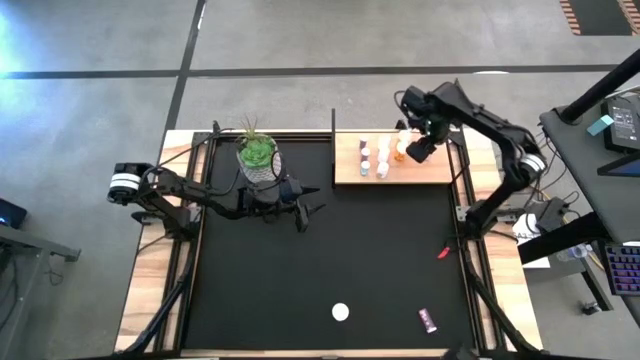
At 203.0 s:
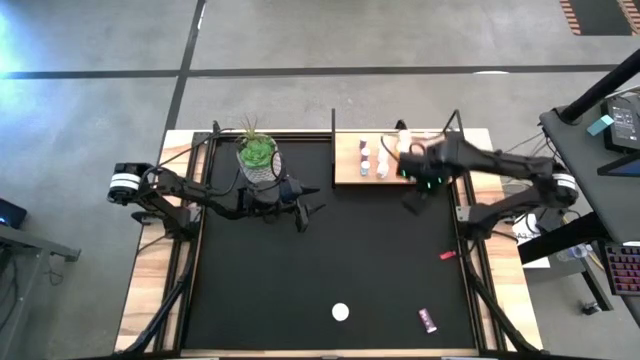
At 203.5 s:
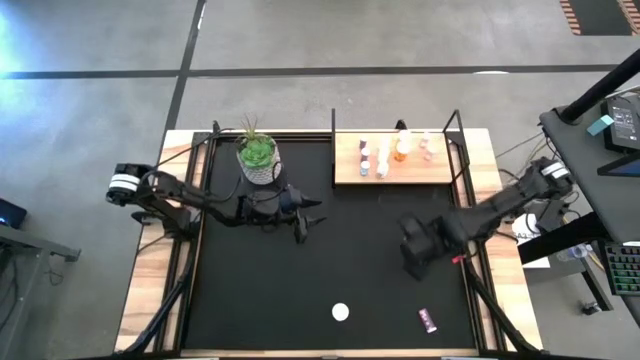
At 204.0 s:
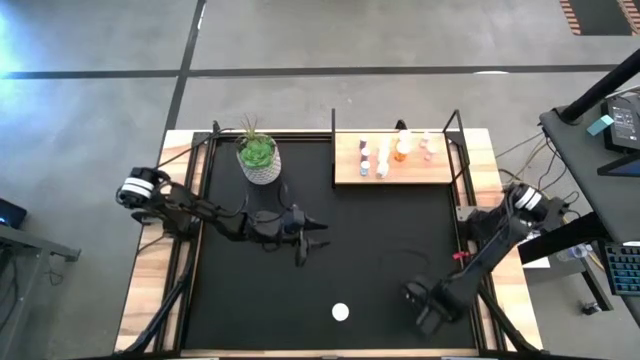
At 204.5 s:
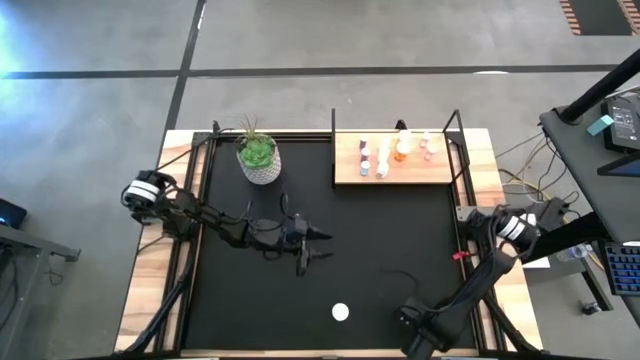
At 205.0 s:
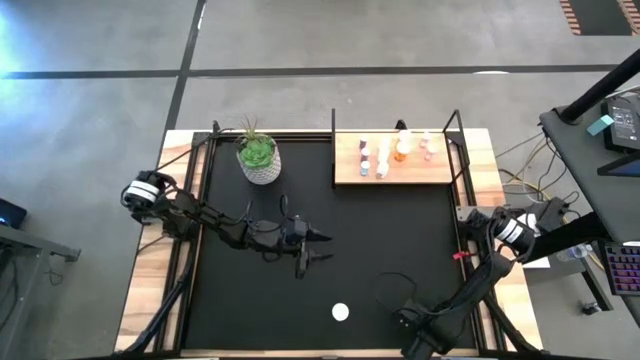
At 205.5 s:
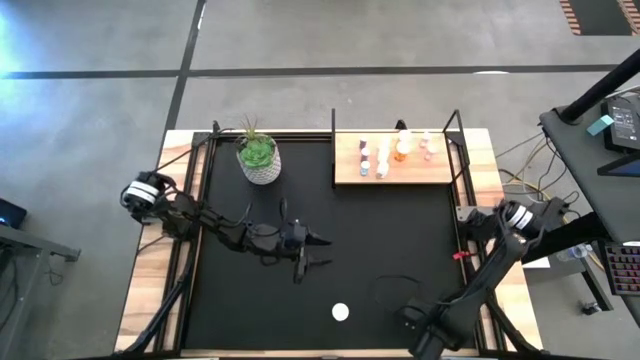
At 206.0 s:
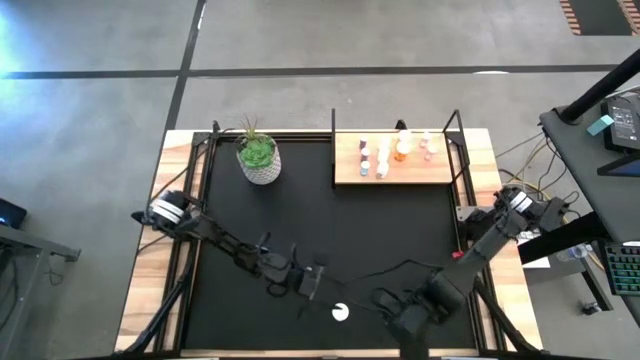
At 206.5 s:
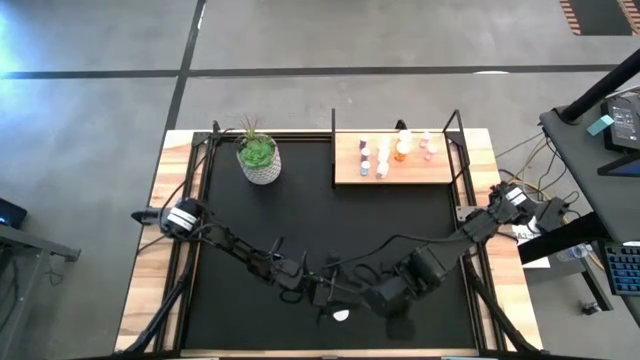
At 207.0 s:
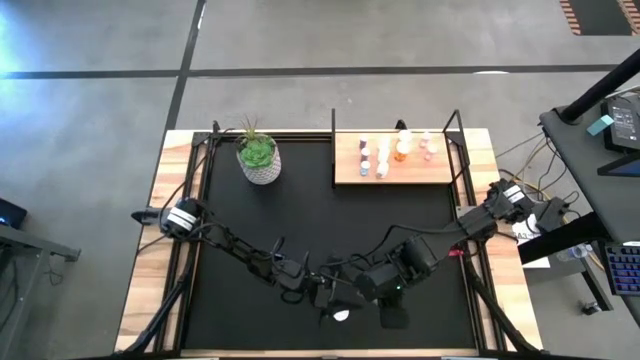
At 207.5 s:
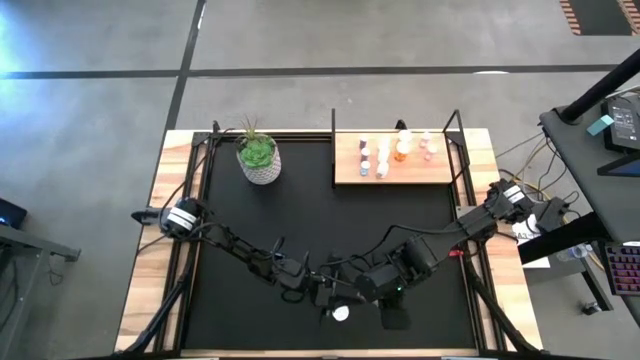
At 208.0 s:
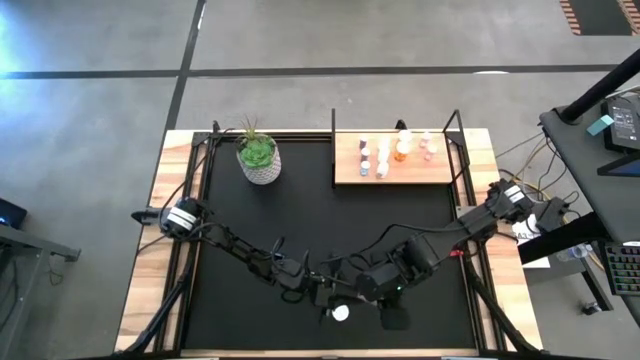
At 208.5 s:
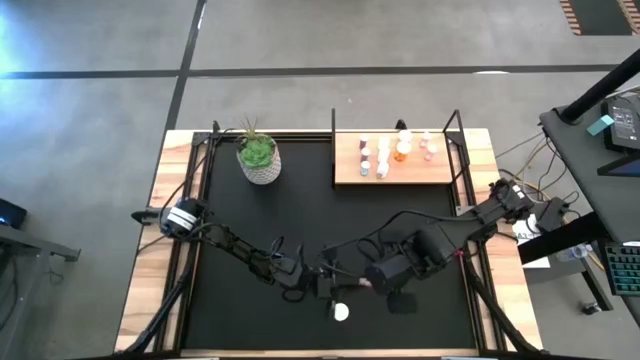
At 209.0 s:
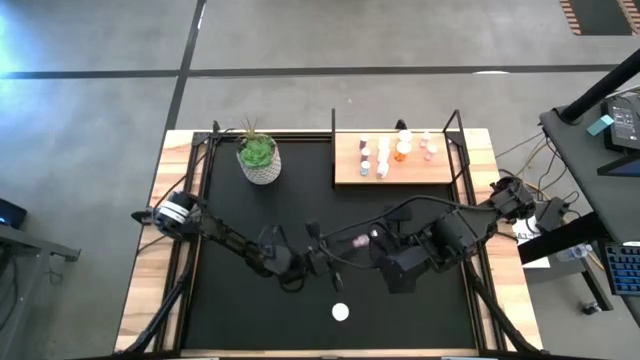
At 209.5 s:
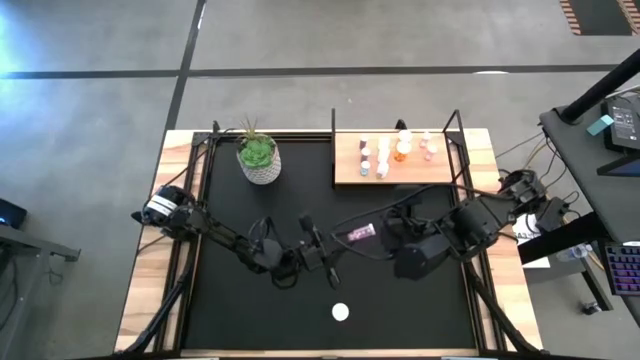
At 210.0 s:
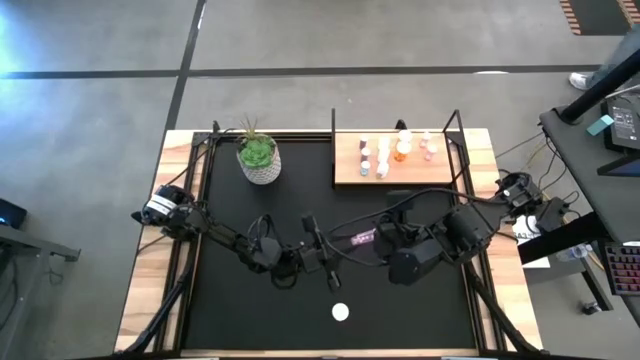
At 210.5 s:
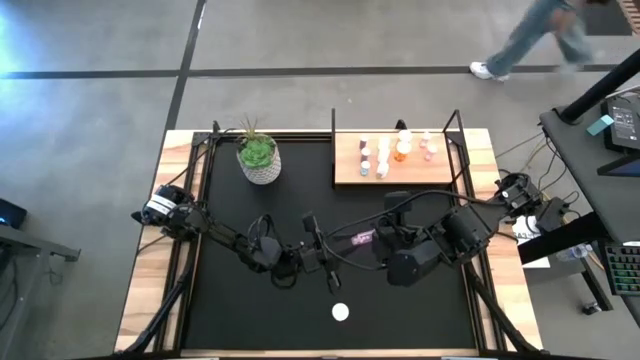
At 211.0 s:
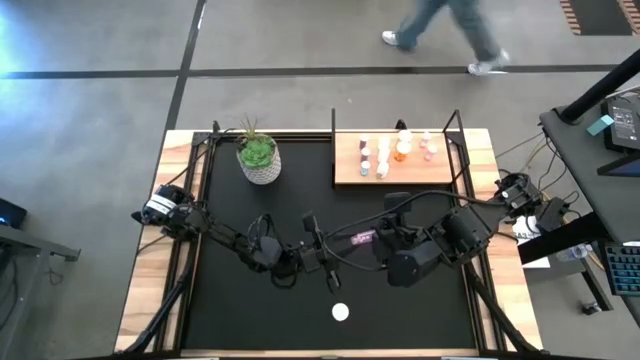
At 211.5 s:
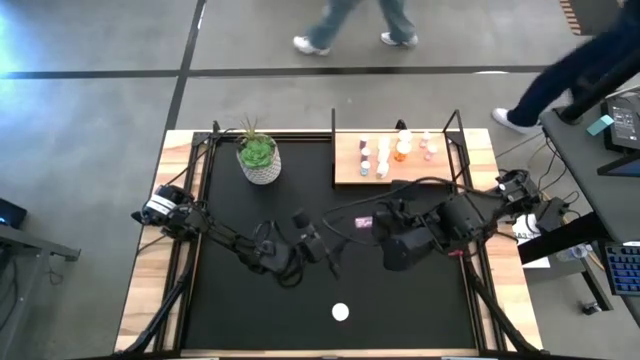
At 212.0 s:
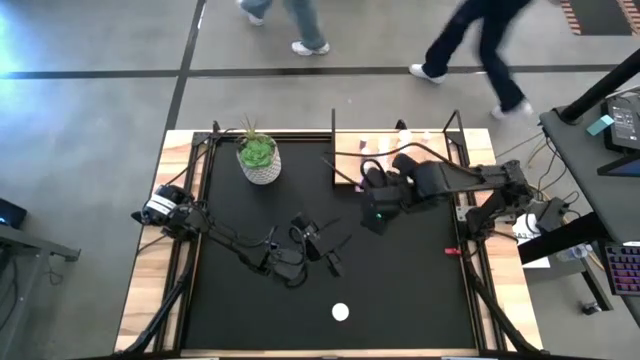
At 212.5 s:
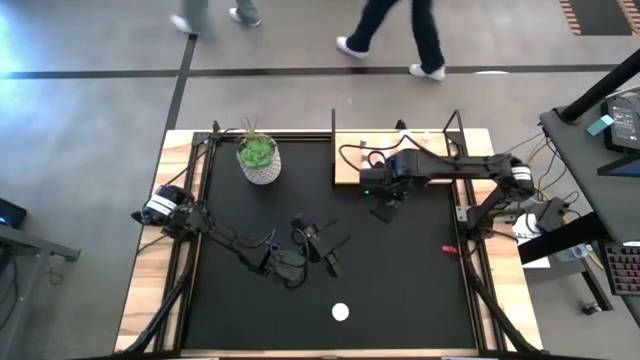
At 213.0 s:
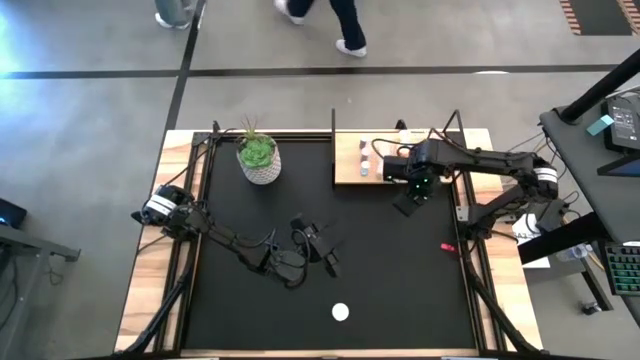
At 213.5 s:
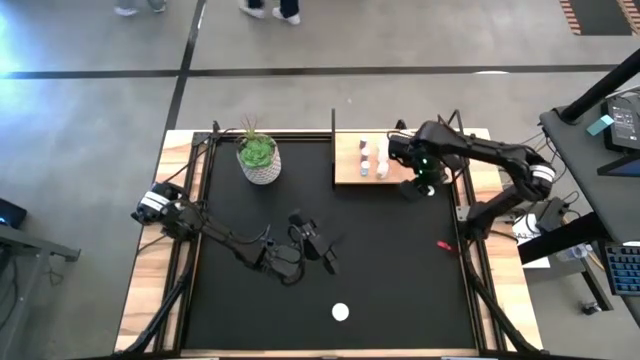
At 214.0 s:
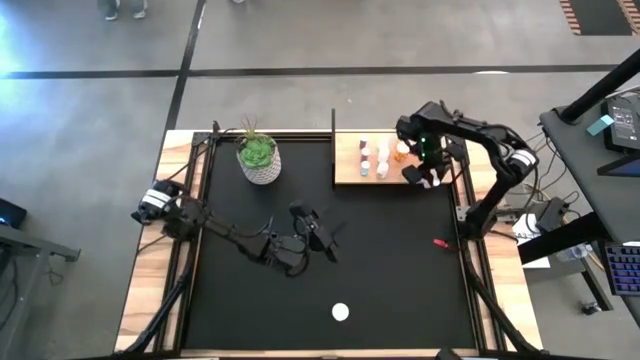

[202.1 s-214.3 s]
Task: Pick and place medicine bottles onto shelf by color
Put the pink pill bottle on the shelf aligned with the other pink pill bottles

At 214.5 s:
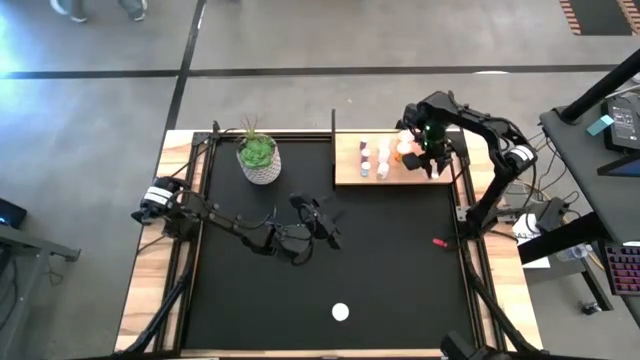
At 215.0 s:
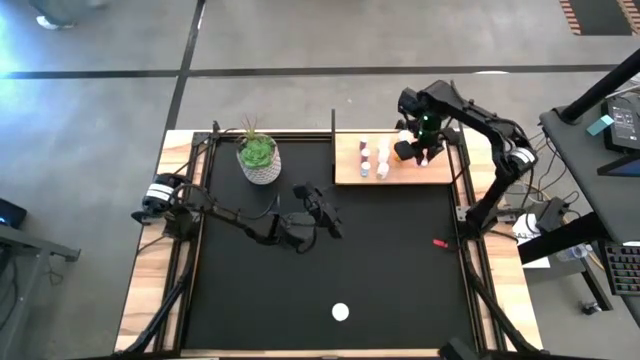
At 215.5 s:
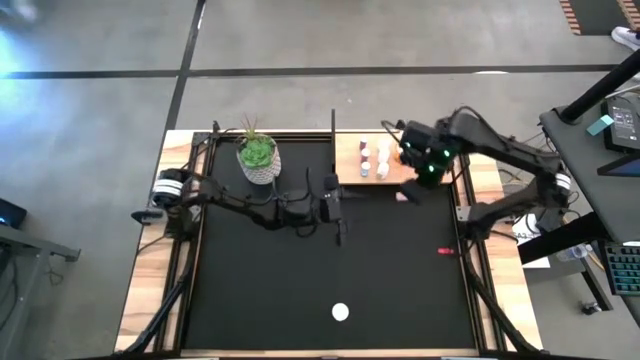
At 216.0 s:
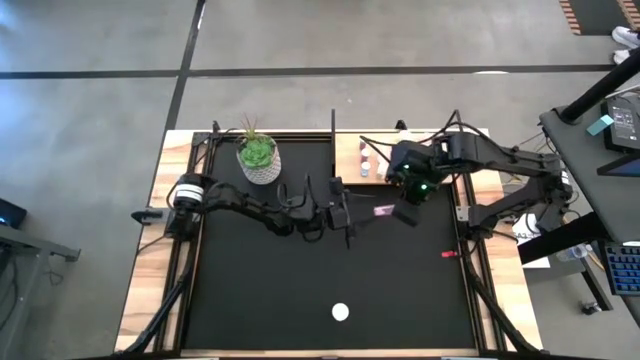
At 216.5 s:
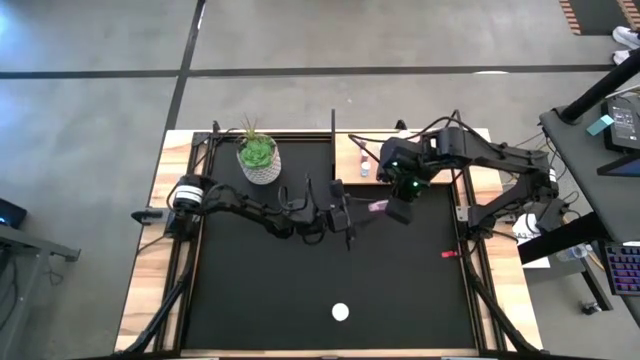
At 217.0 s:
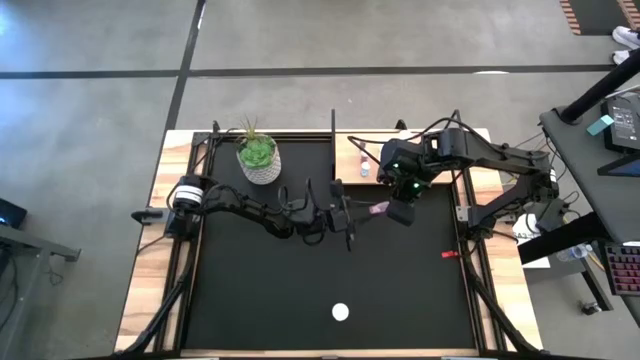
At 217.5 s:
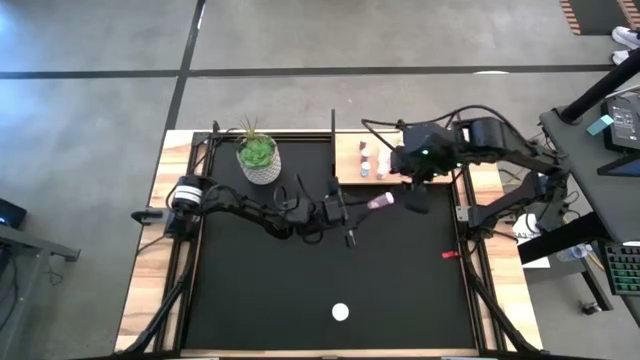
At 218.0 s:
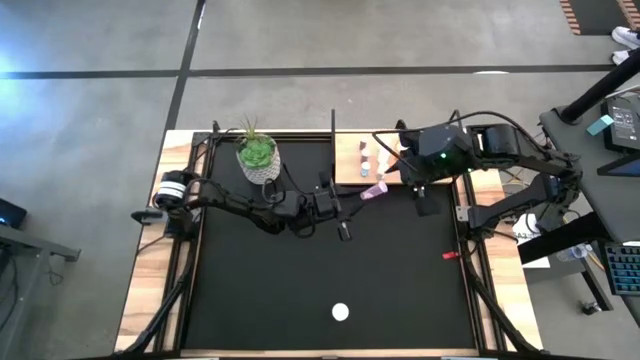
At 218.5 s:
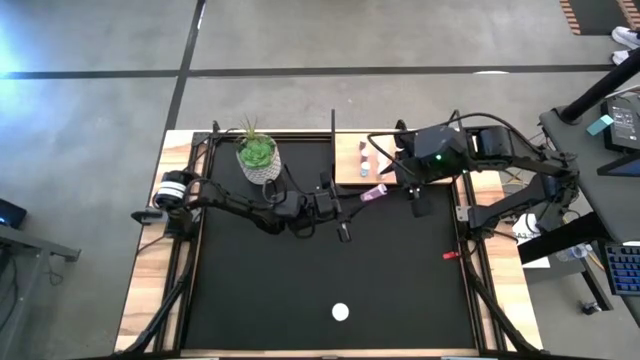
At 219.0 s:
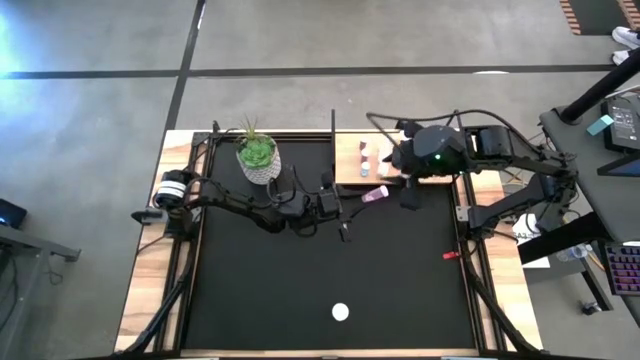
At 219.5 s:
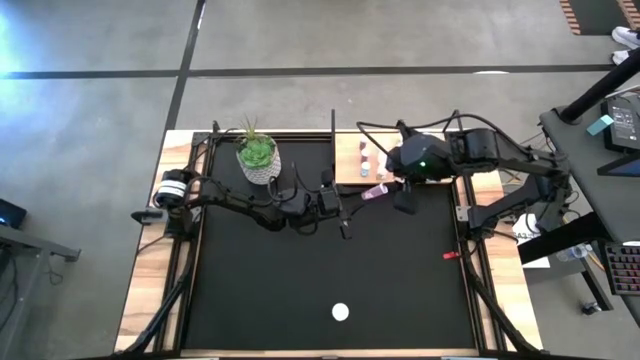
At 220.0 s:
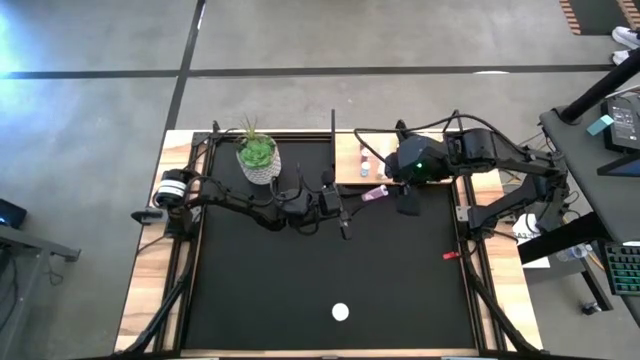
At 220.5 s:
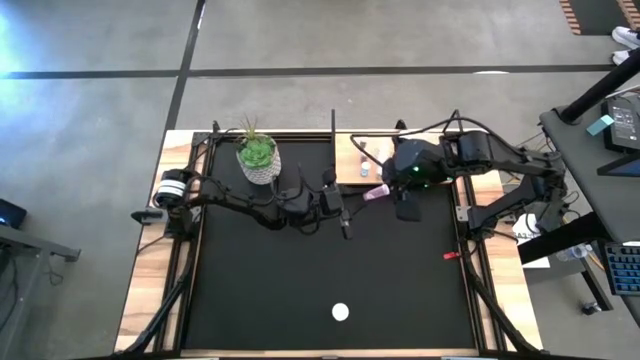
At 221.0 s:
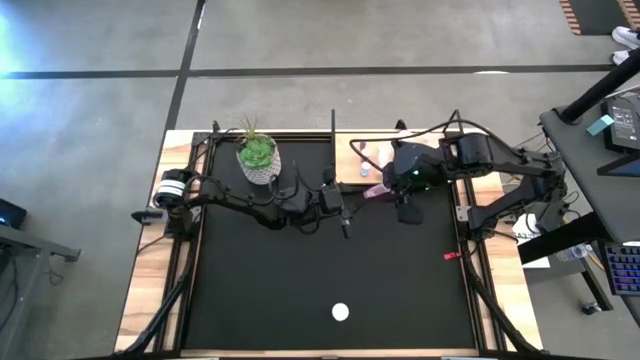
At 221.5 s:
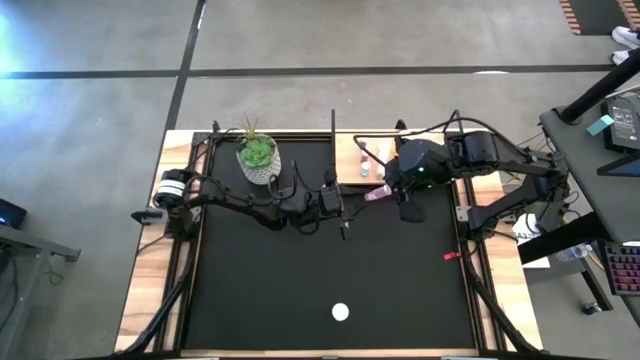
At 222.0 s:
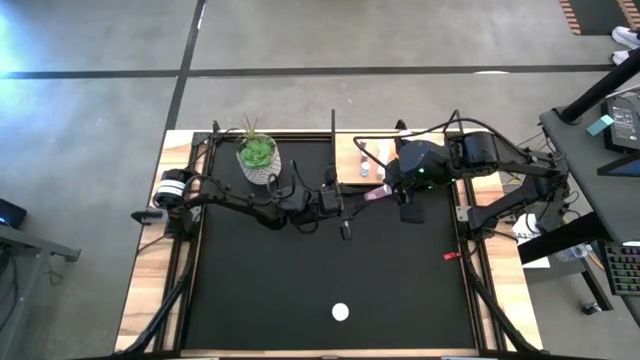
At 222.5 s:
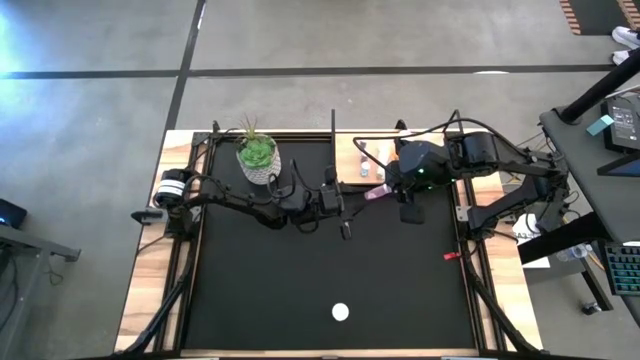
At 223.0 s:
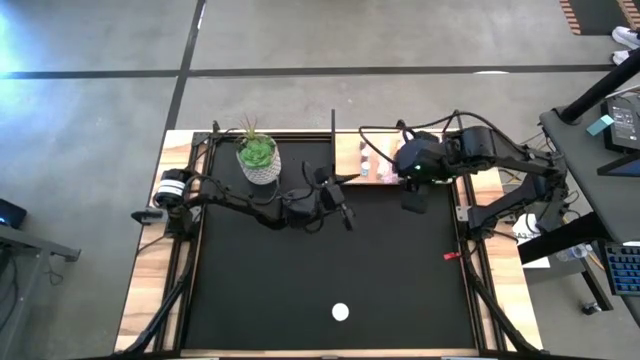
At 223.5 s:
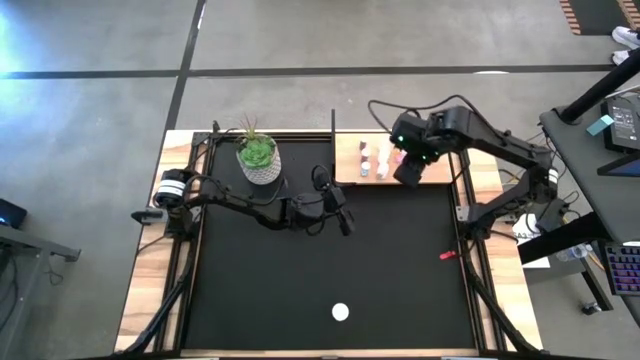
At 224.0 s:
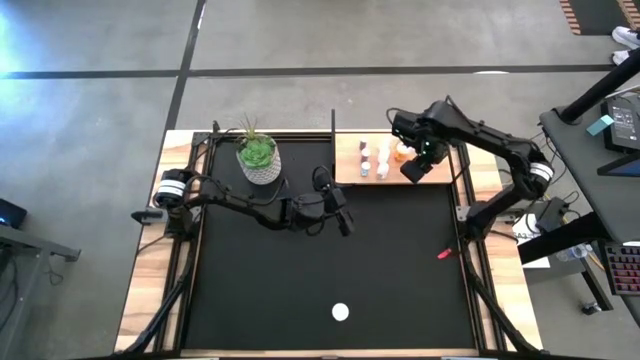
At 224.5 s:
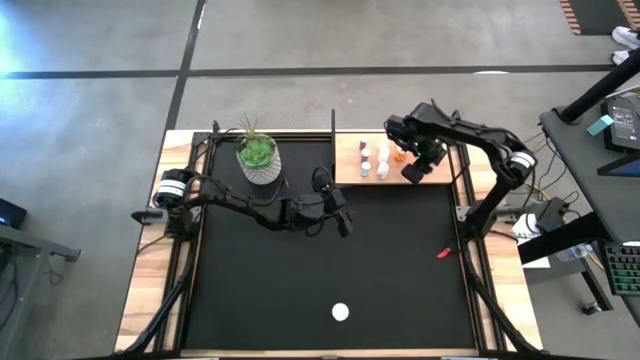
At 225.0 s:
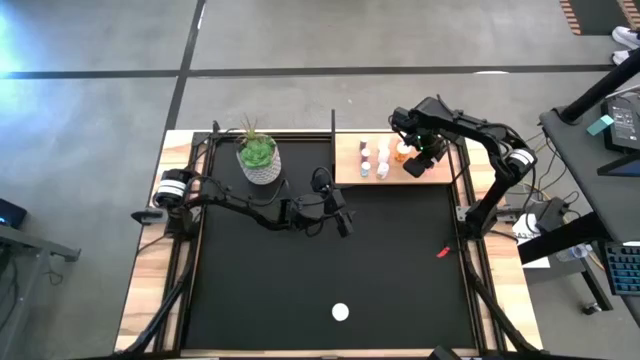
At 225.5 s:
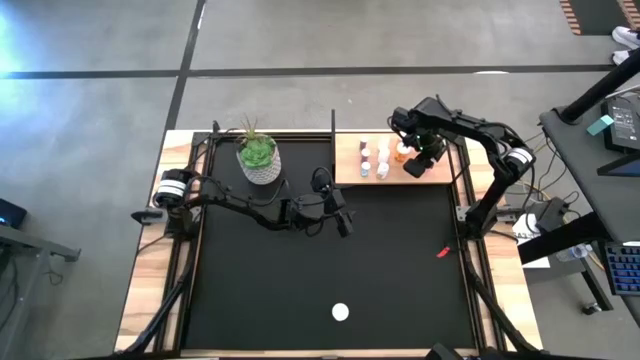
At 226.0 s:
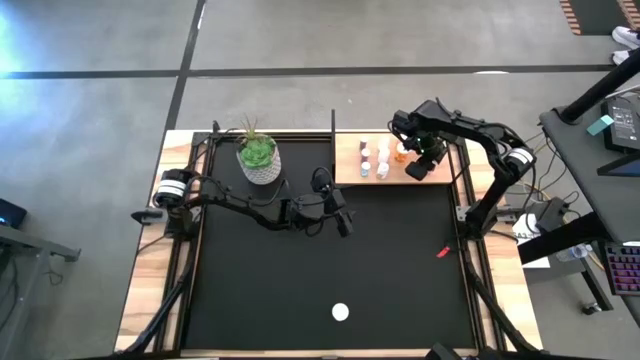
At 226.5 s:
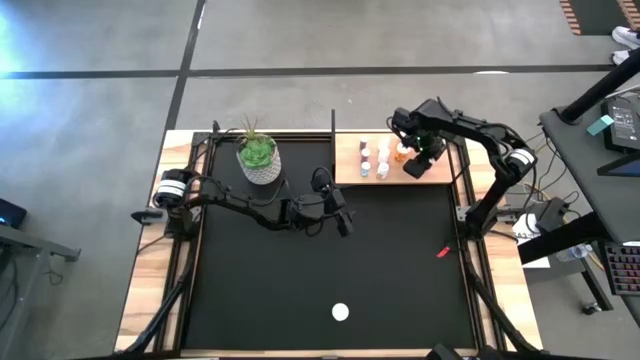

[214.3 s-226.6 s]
Put the pink pill bottle on the shelf aligned with the other pink pill bottles
